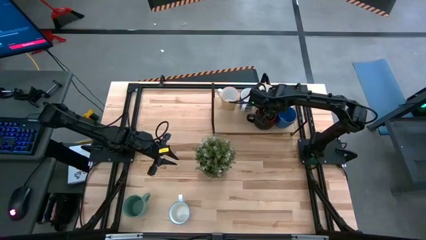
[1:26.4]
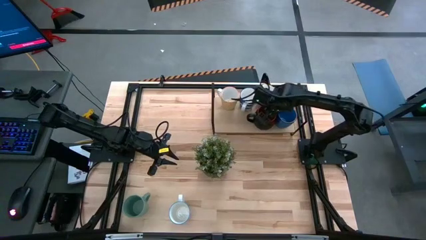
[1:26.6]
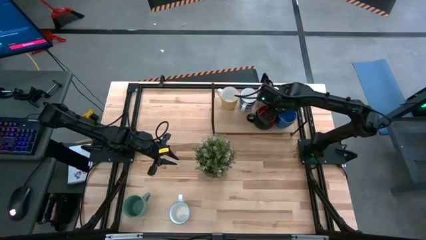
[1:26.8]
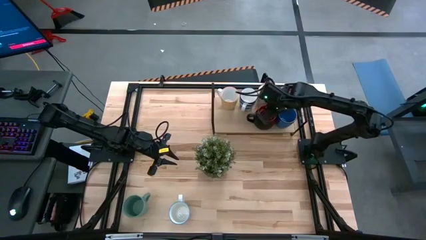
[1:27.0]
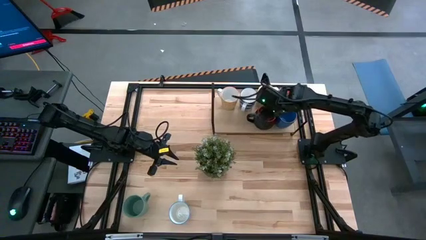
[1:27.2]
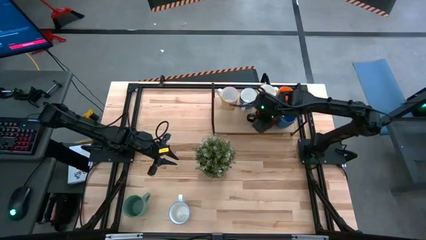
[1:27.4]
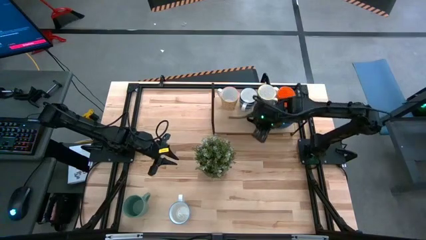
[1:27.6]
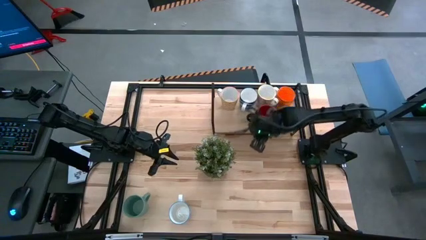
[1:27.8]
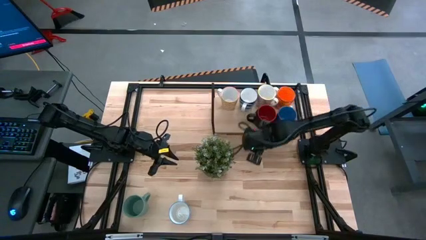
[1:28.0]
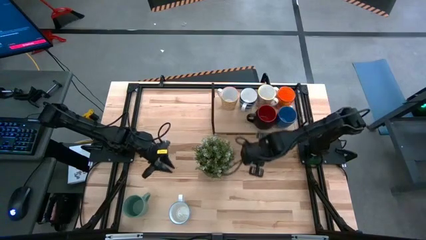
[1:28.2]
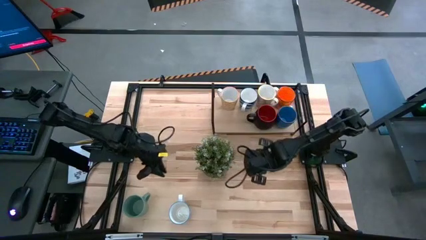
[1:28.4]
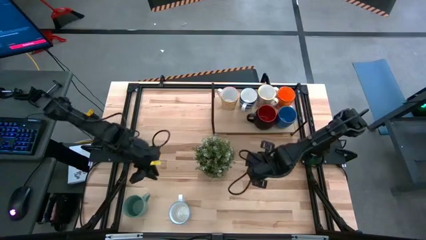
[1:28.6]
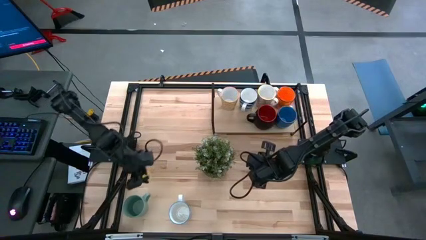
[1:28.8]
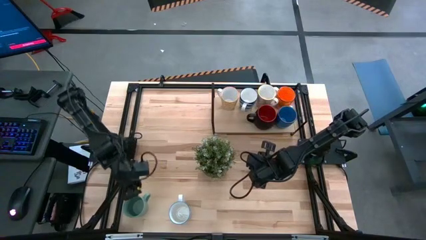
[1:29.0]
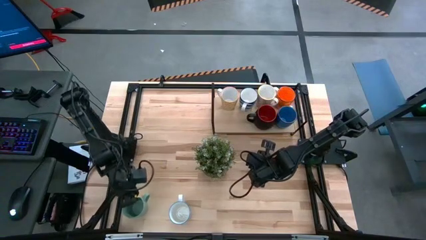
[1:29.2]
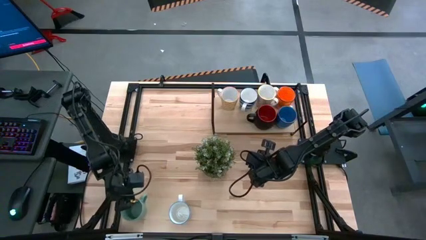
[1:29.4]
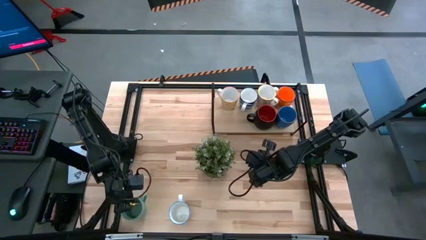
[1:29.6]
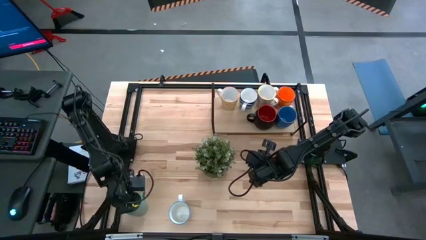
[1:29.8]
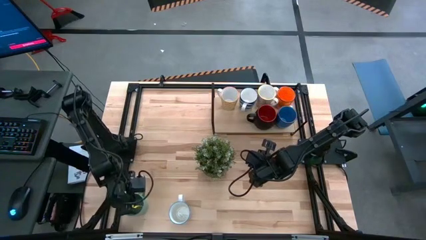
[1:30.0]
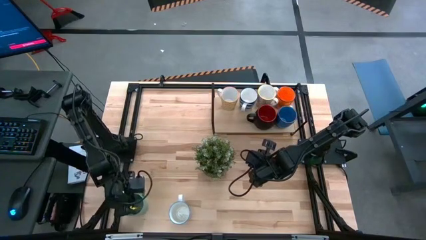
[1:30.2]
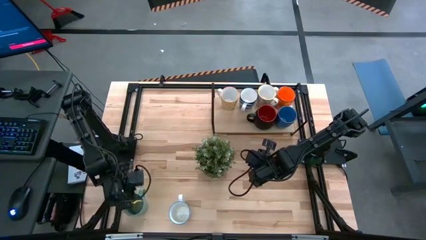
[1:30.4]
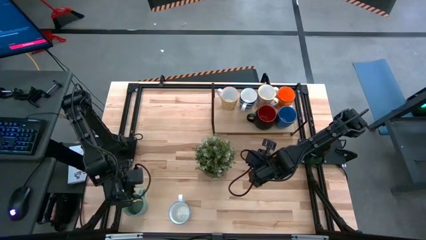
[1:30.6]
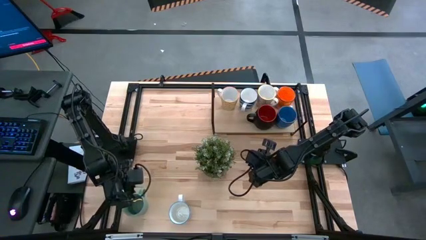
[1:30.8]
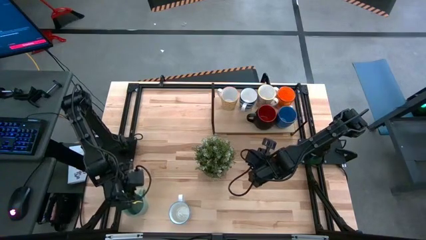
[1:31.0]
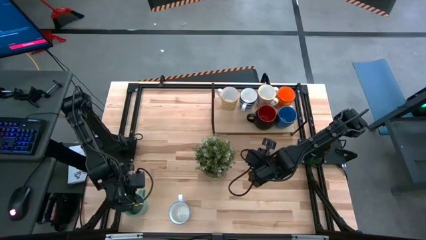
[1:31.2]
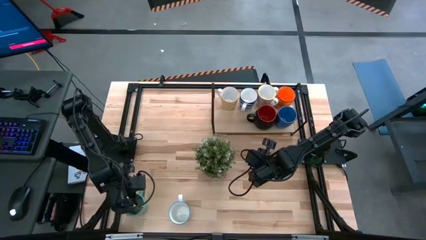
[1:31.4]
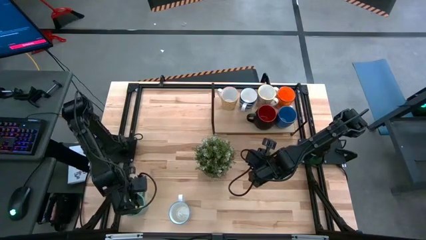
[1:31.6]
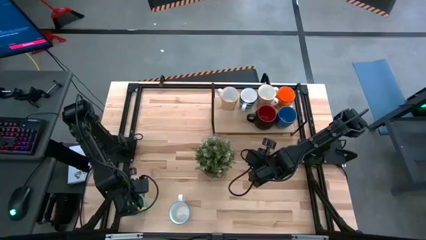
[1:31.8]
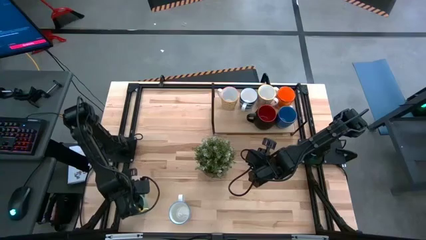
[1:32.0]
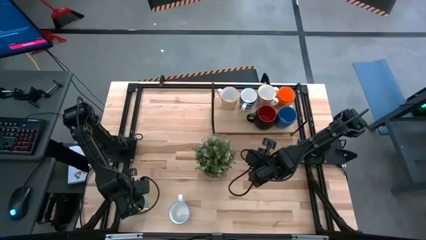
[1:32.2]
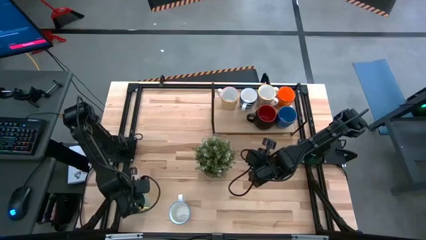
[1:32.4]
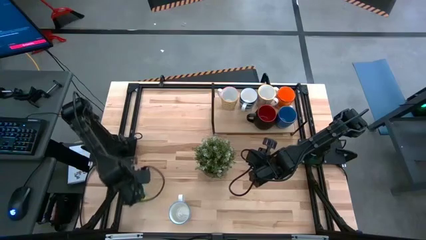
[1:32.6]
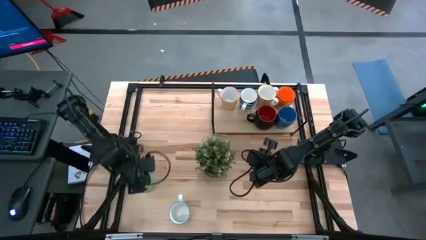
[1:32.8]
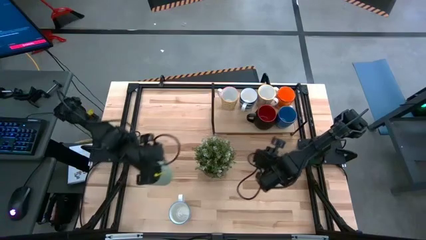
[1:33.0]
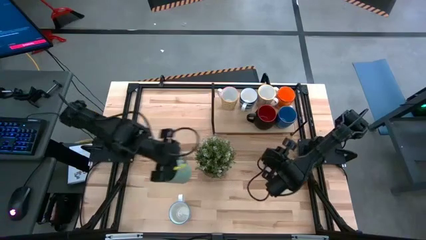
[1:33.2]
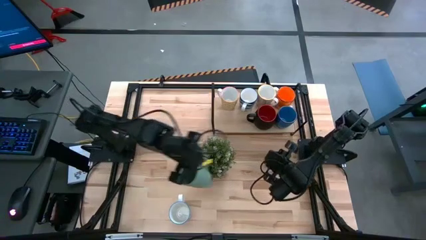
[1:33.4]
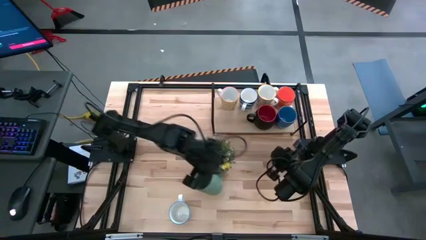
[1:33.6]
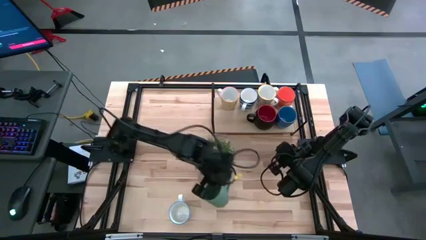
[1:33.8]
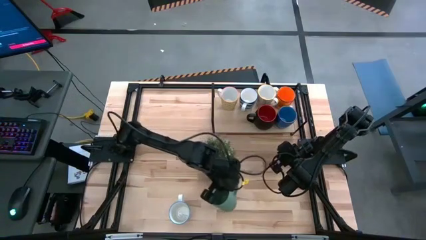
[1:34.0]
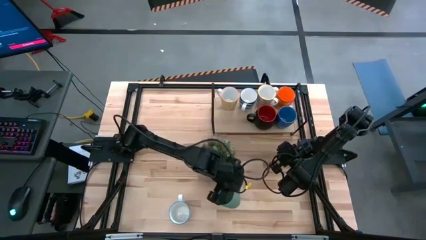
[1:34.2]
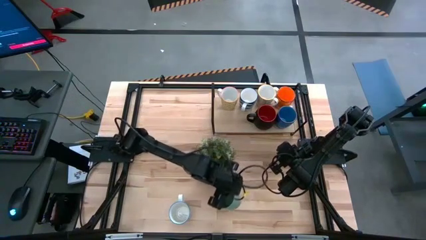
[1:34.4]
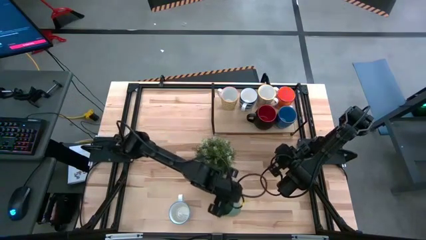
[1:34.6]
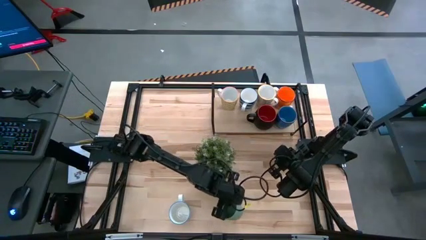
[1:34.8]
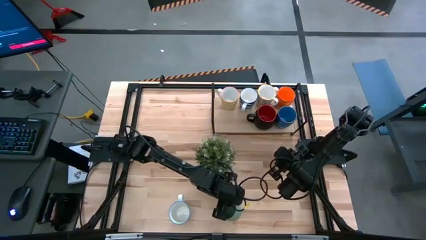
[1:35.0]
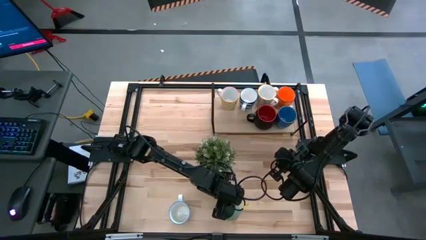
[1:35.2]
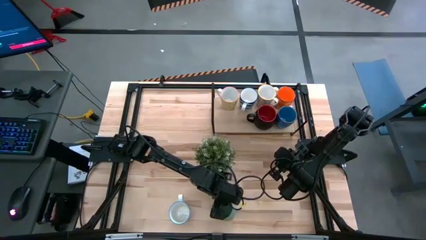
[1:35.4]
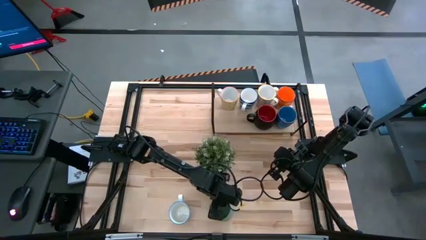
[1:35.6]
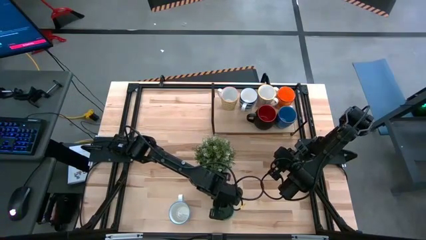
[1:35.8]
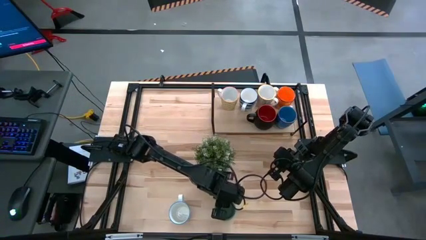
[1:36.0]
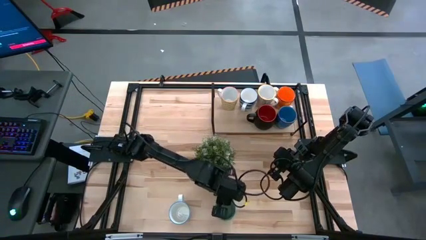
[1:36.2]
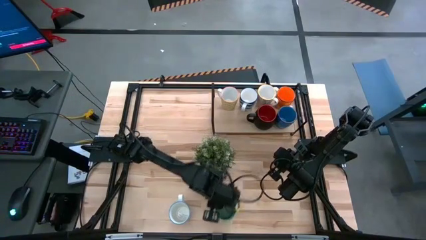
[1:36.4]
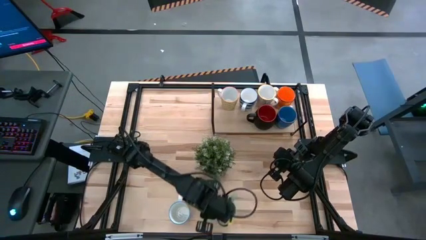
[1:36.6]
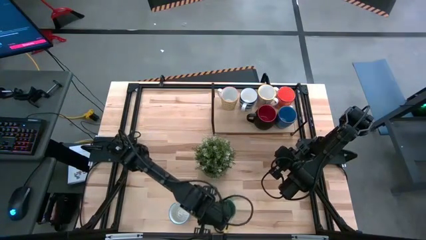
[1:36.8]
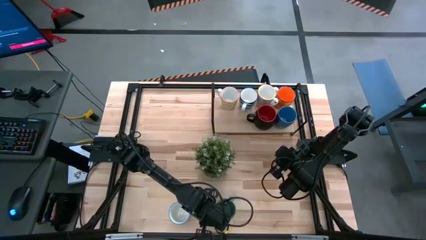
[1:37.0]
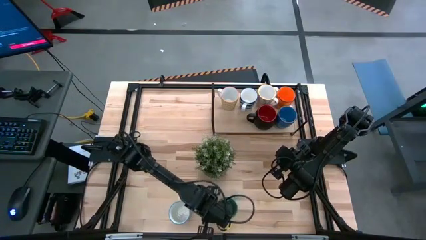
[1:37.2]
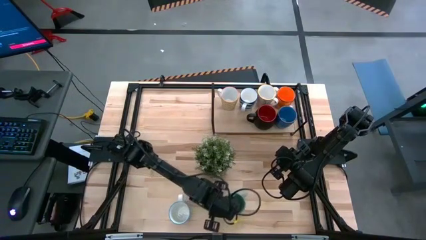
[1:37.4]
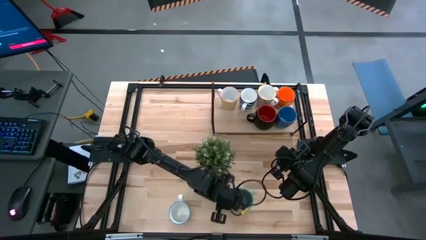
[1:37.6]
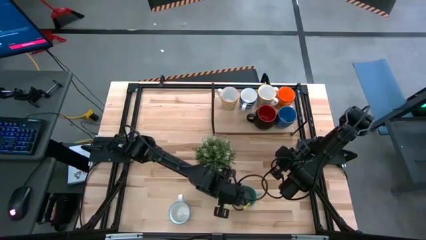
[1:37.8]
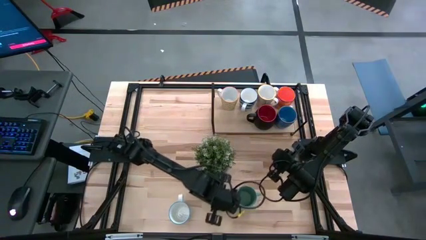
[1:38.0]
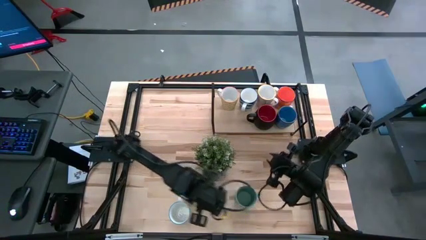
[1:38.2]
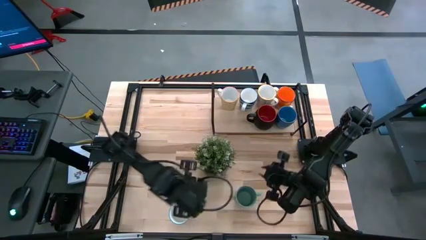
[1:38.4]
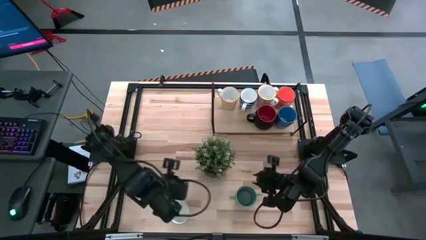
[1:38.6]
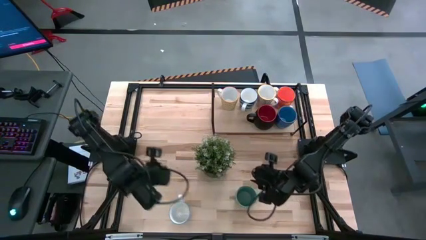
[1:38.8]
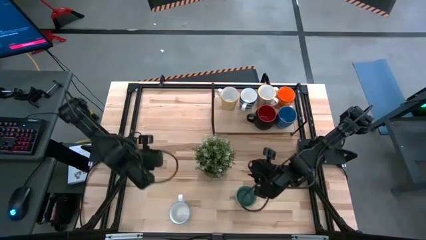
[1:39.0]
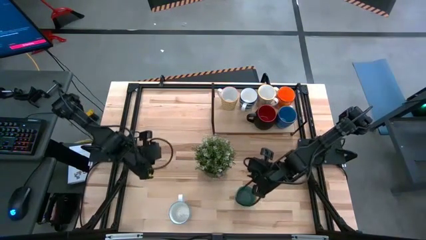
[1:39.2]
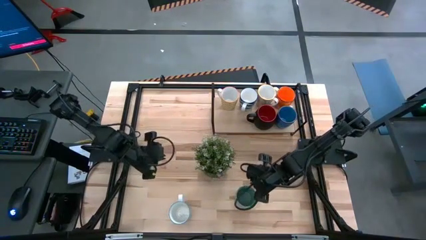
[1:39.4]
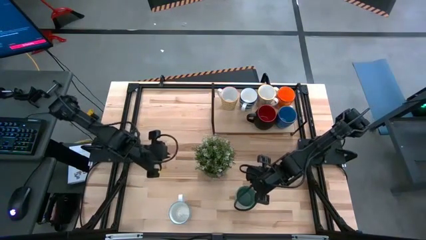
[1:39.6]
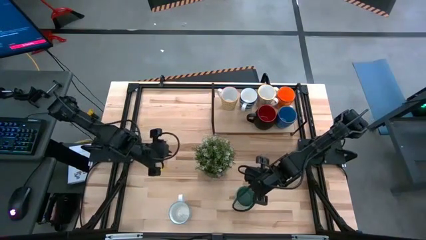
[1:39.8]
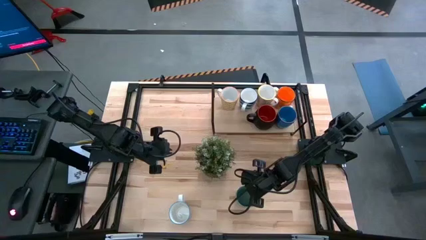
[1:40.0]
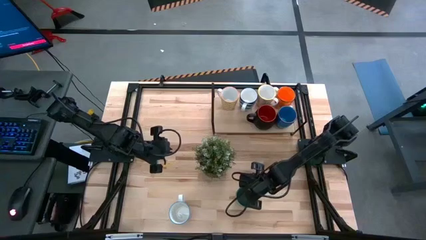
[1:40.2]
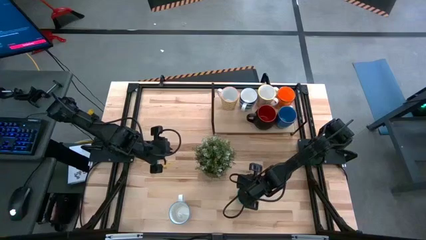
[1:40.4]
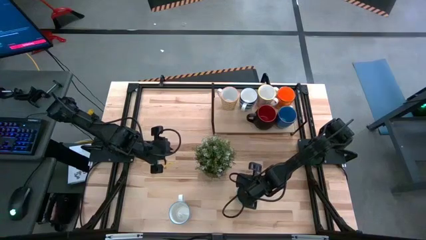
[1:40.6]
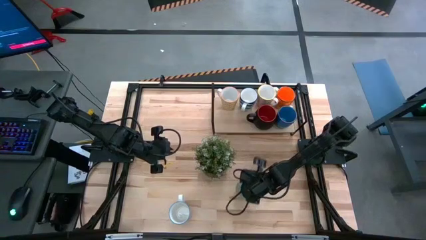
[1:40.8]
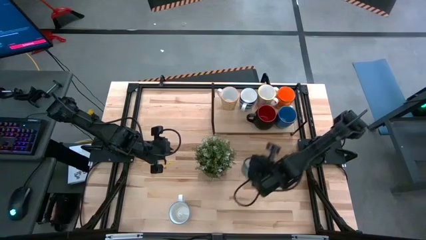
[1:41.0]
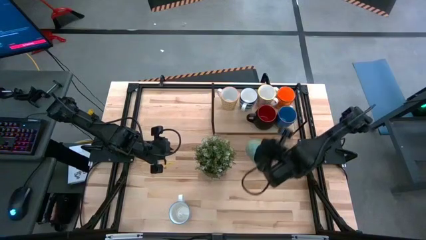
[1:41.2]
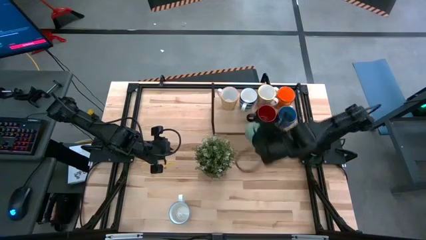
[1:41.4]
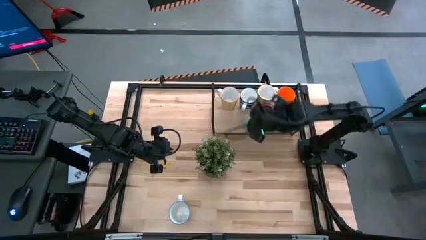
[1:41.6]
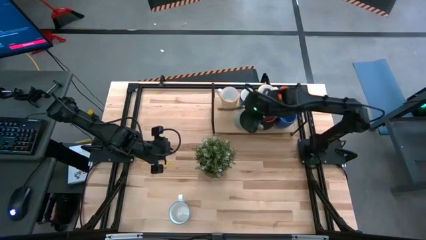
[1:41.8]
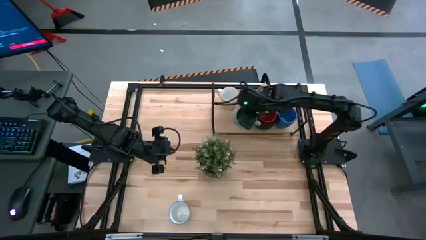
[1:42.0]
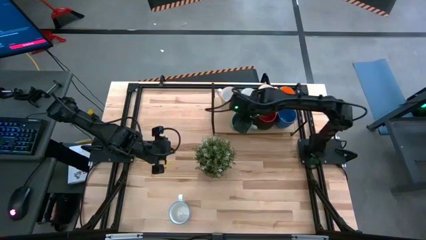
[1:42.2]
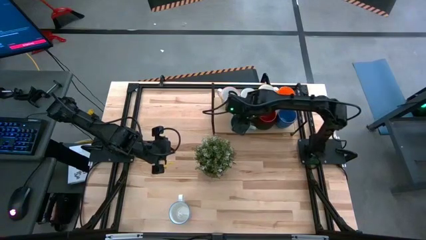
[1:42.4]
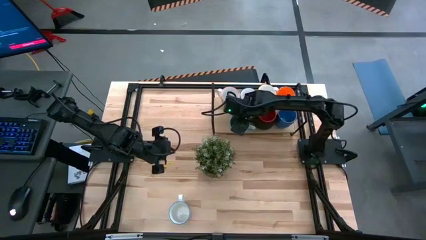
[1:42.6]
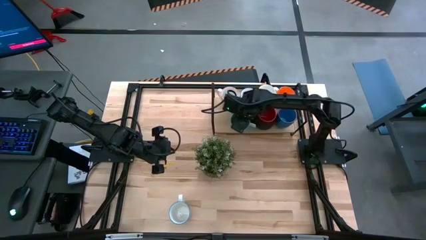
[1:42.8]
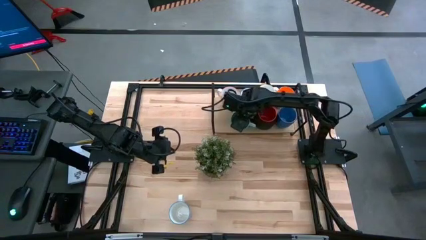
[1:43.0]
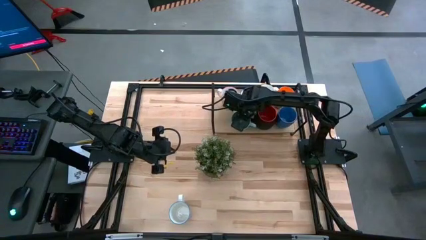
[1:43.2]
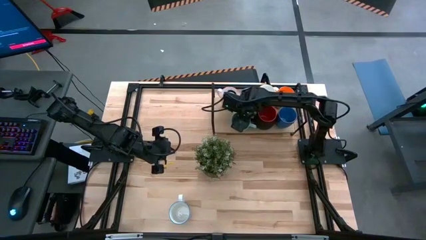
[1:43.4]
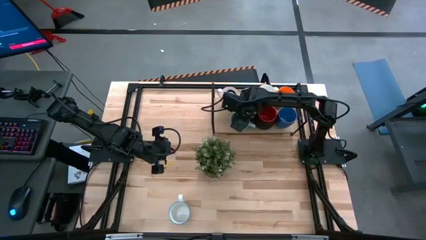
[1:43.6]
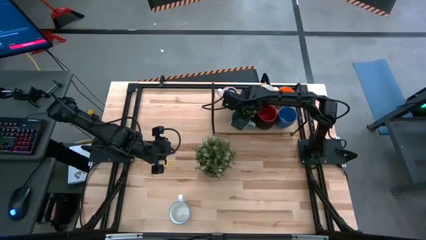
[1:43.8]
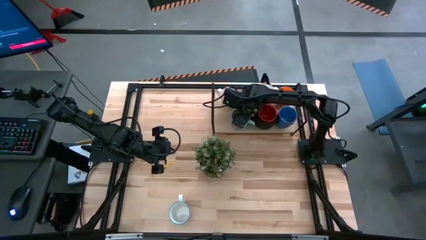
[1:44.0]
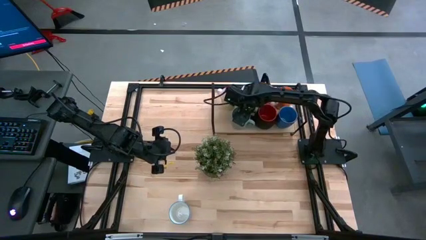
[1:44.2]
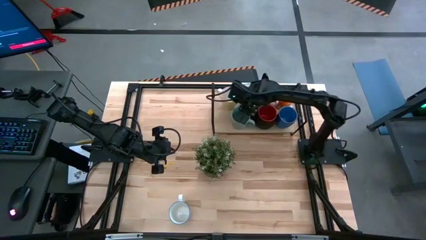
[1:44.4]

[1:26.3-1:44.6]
Task: Place coffee mugs
Put the green mug on the shelf
